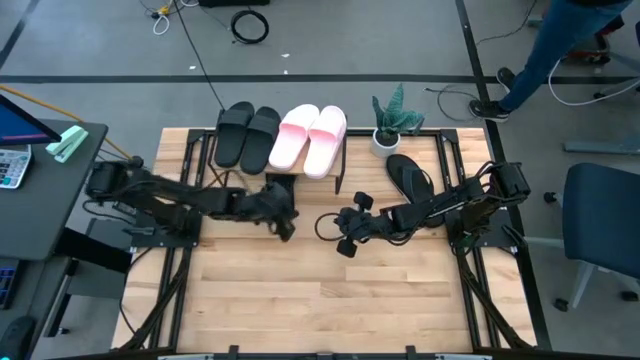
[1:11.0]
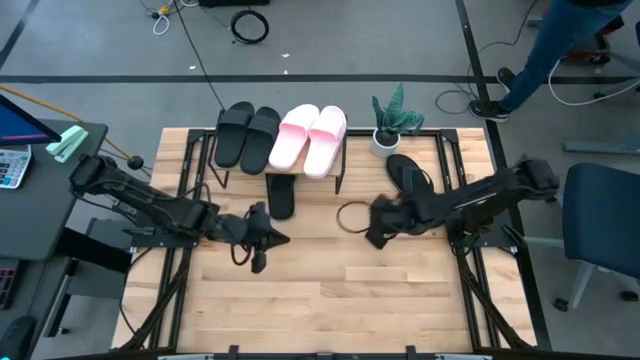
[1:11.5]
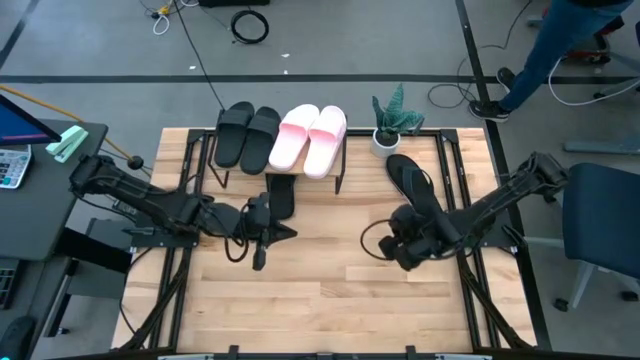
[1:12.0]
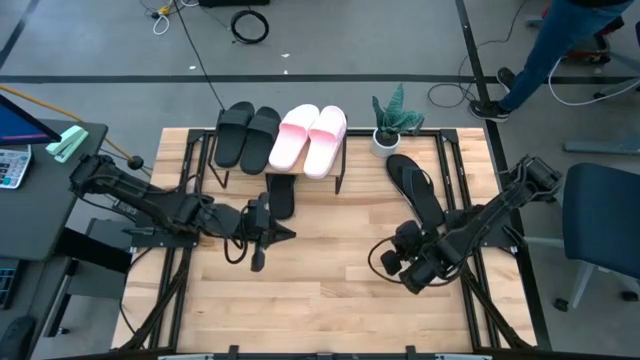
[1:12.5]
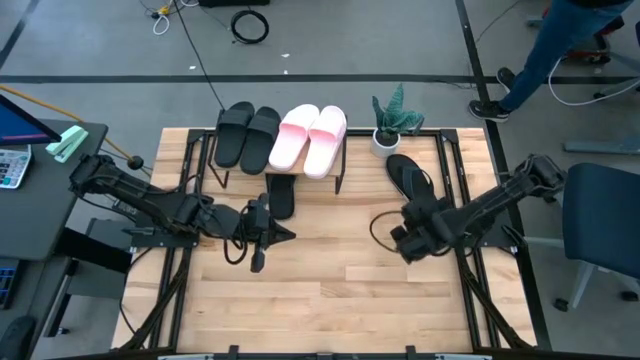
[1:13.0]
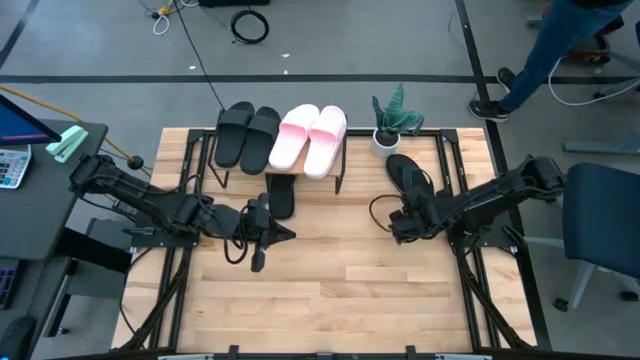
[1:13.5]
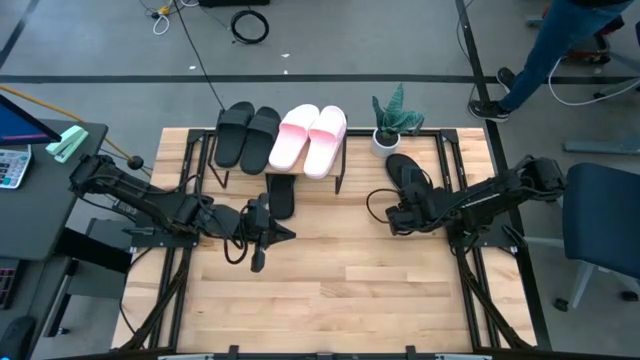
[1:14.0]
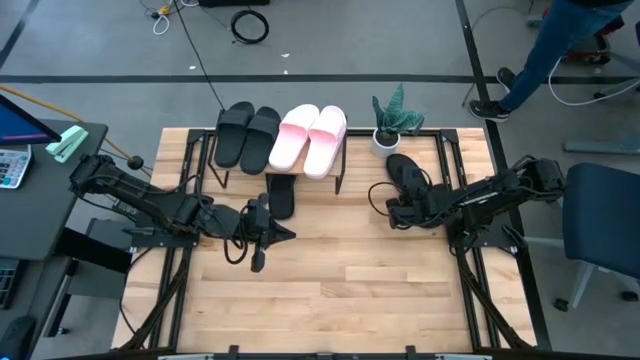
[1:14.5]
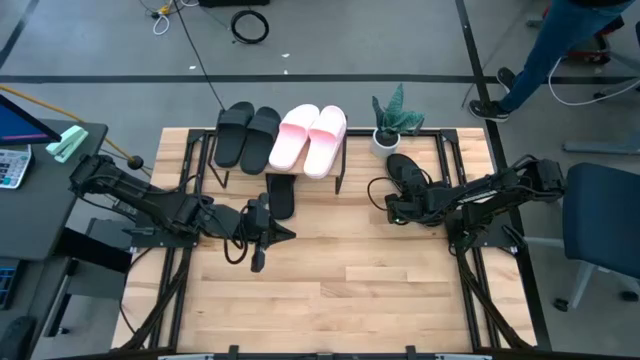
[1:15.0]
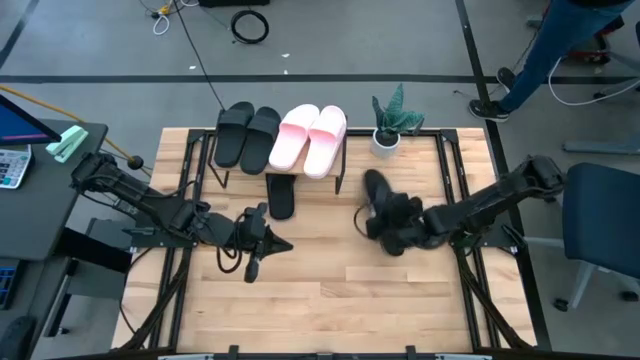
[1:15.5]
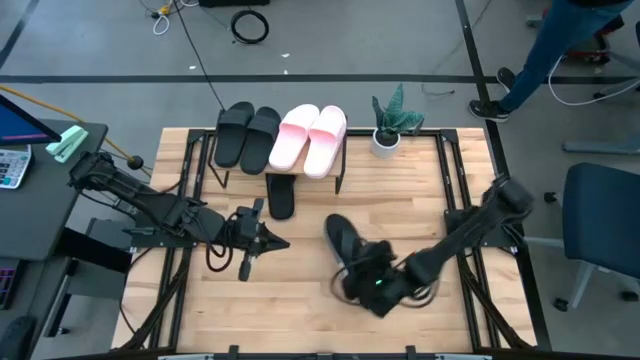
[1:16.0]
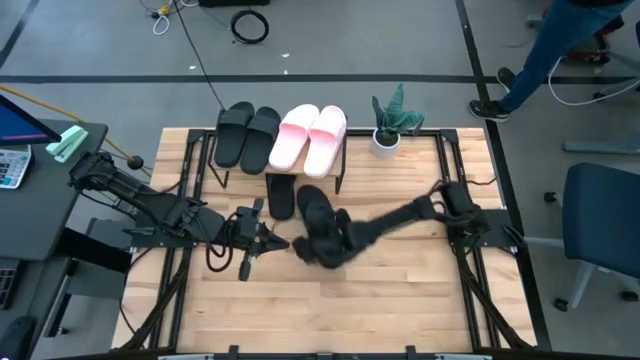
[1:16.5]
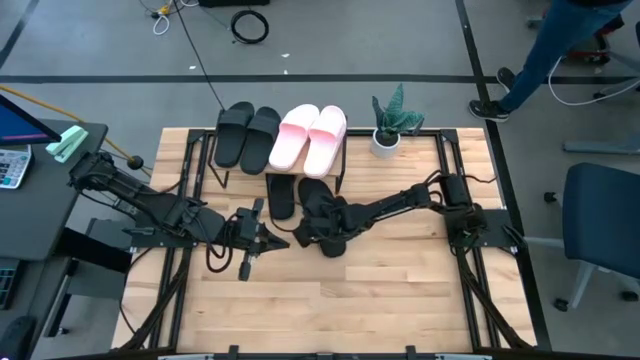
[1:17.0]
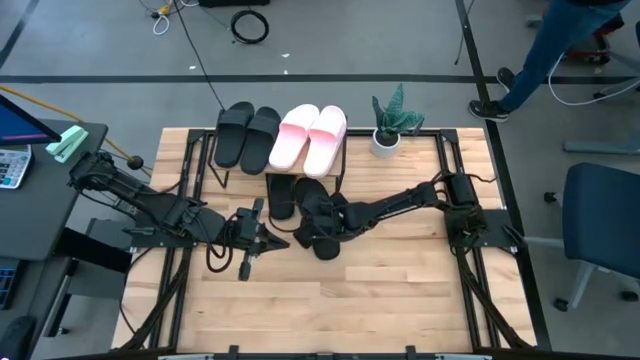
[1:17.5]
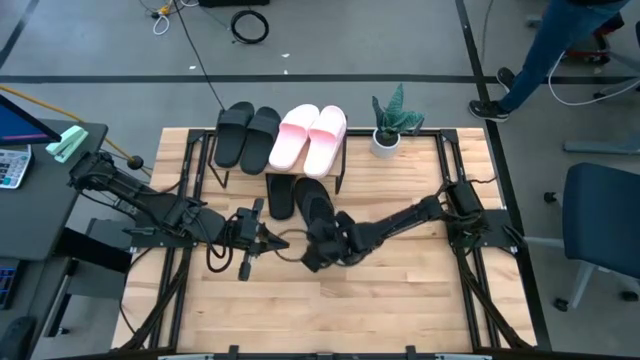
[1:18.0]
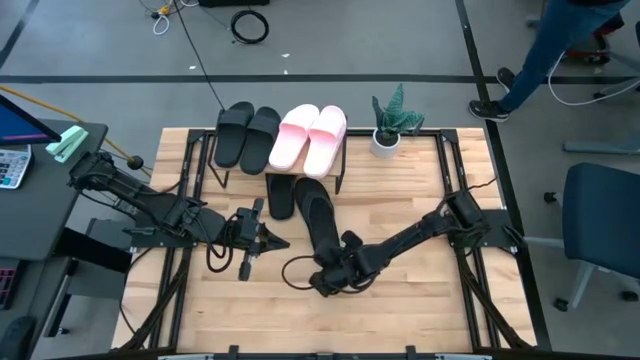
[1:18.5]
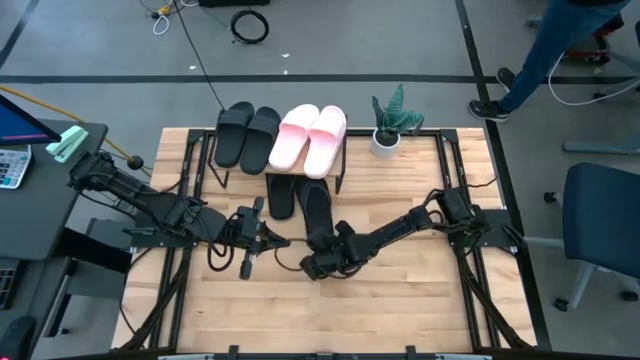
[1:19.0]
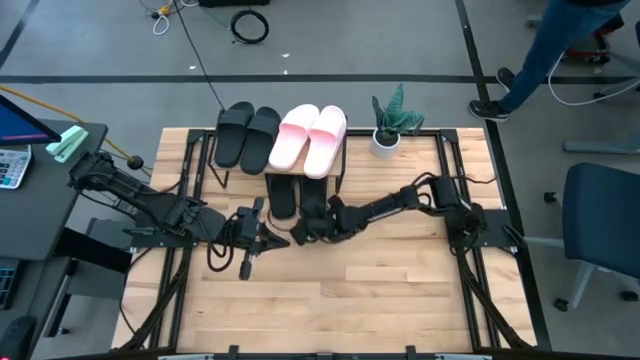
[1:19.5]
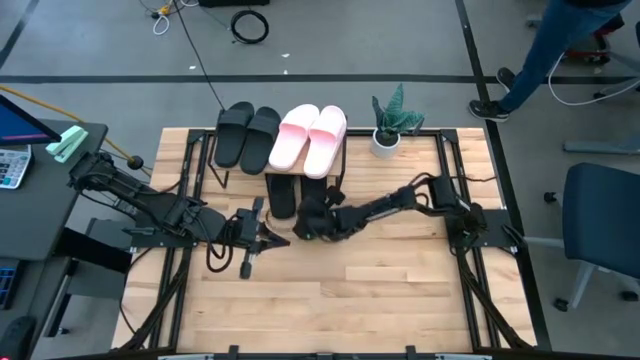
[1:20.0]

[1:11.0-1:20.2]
Task: Pick and place slides into the shelf
Put the black slipper under the shelf

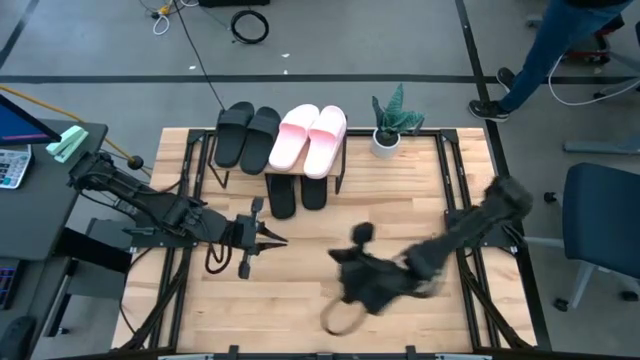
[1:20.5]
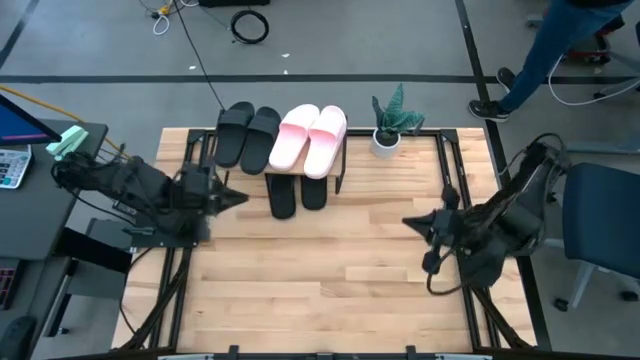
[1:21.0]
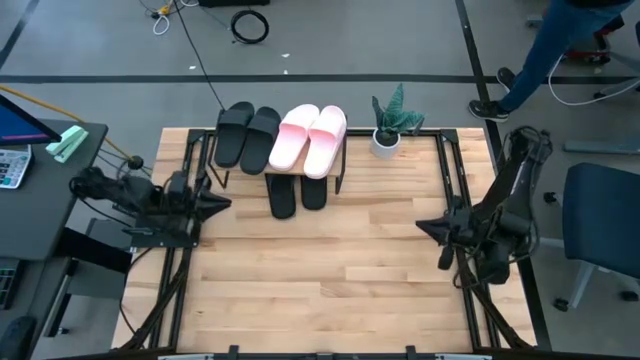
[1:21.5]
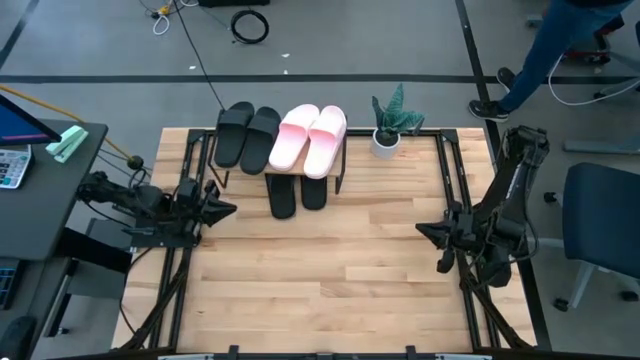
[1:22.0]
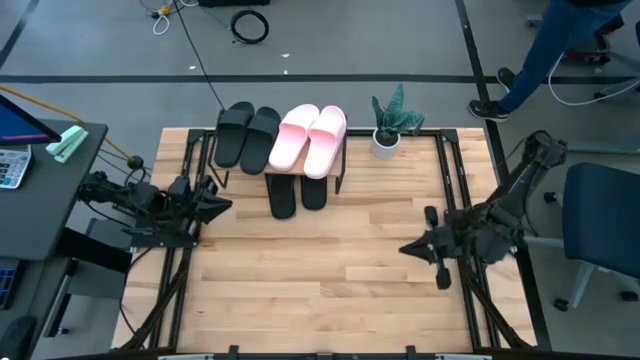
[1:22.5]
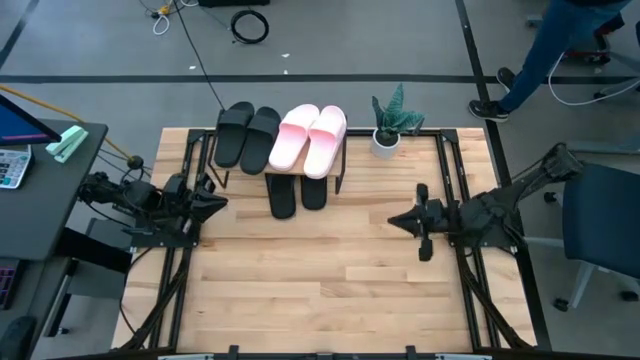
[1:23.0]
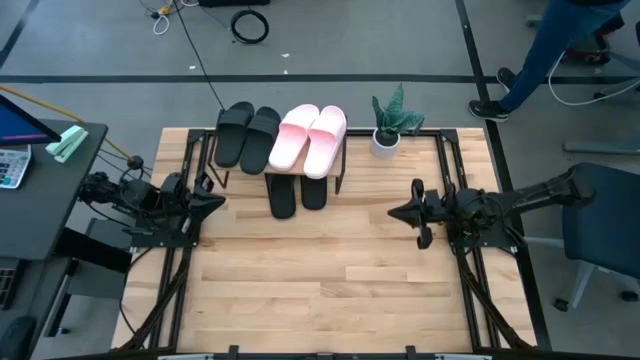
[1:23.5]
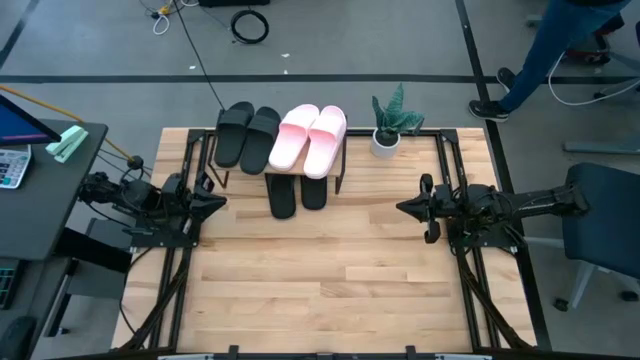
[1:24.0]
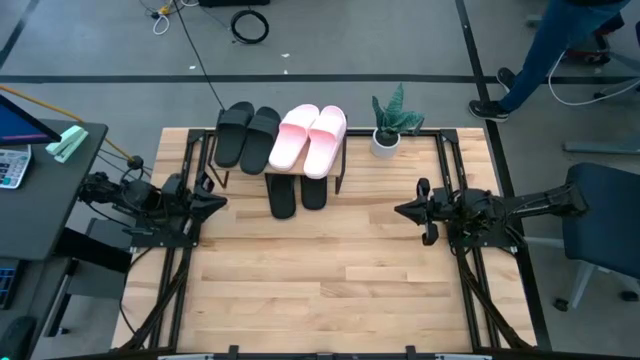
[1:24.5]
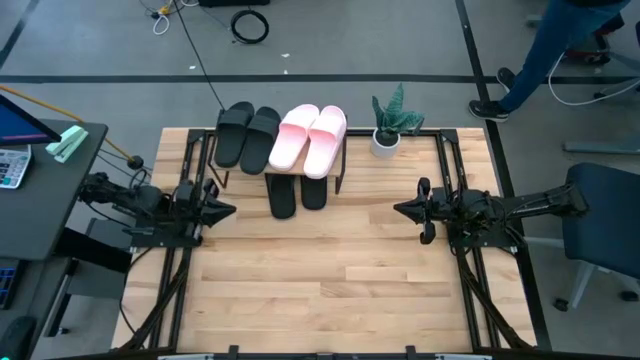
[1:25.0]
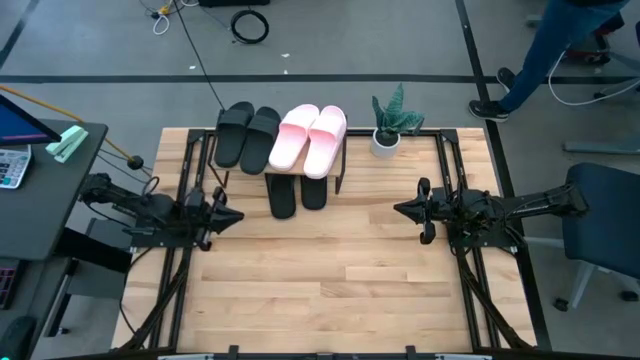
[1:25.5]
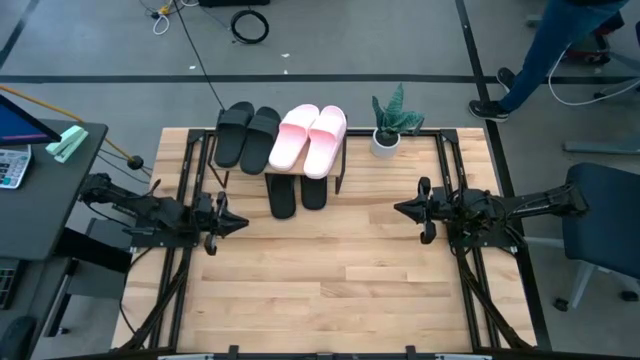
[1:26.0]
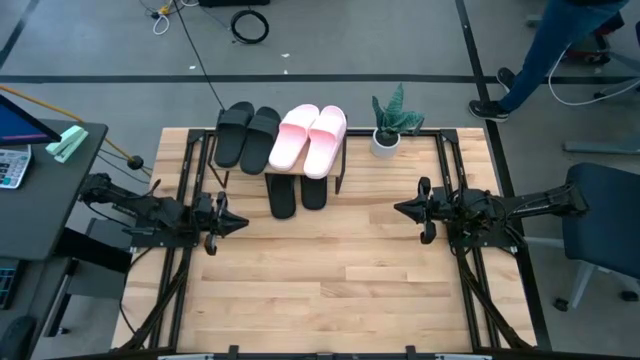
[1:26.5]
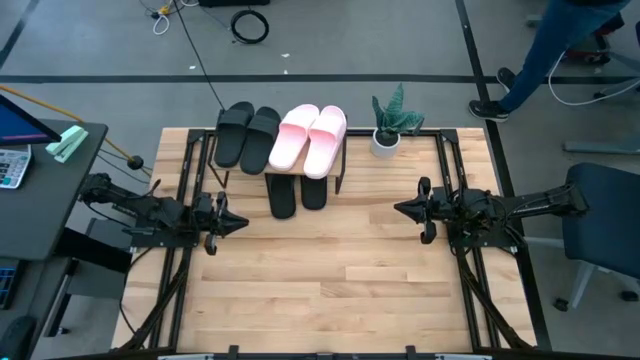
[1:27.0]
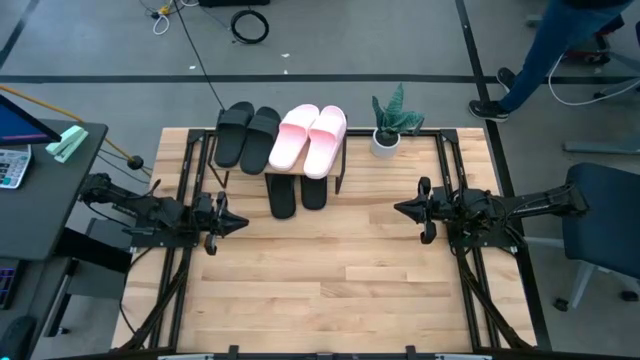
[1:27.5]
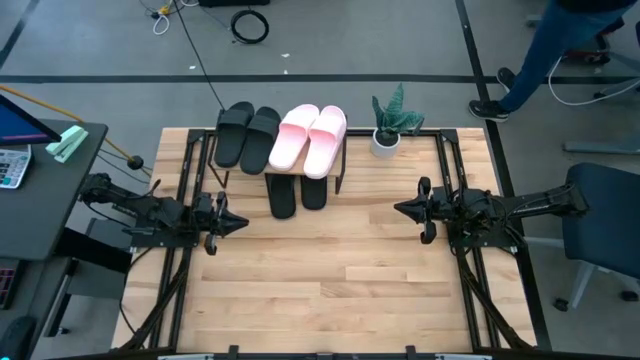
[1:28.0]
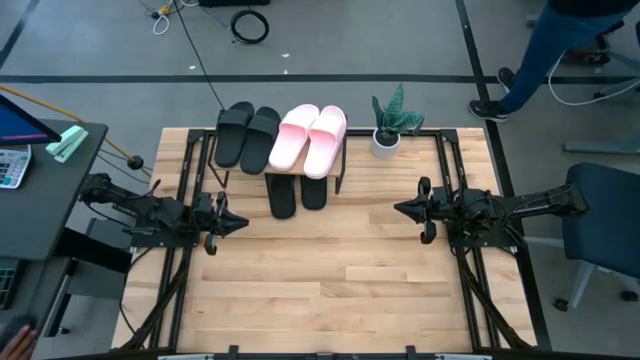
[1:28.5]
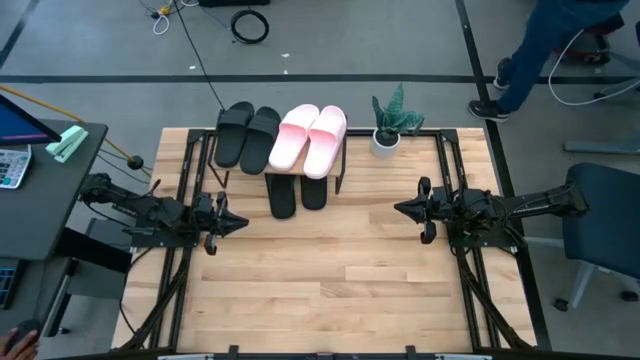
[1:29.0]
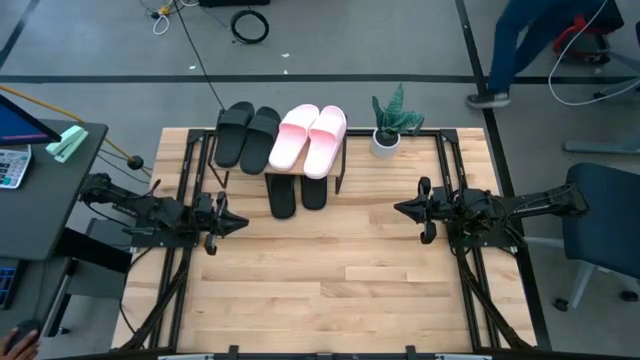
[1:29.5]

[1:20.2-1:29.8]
Return to Home Position

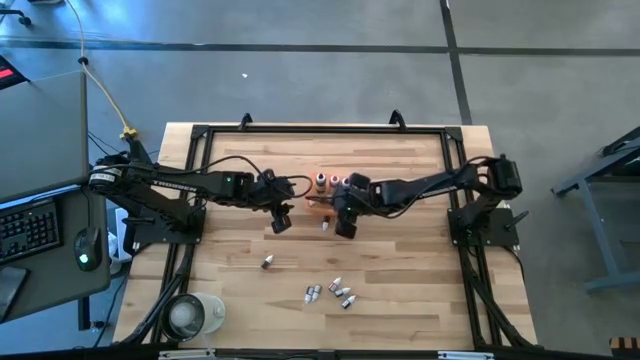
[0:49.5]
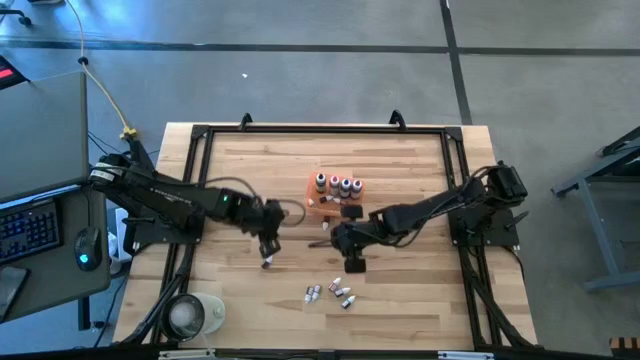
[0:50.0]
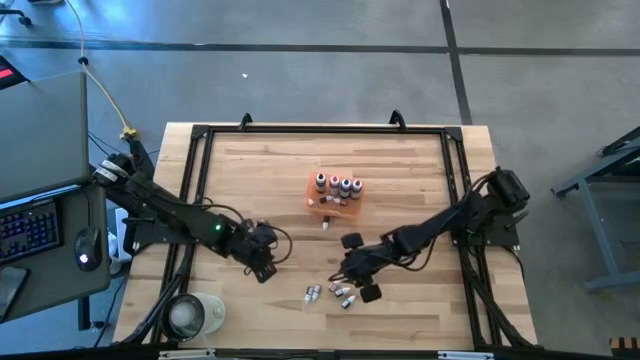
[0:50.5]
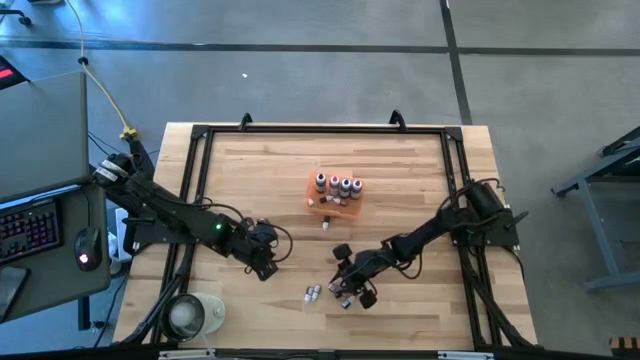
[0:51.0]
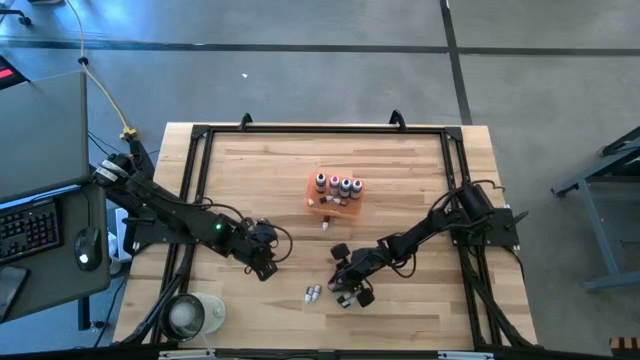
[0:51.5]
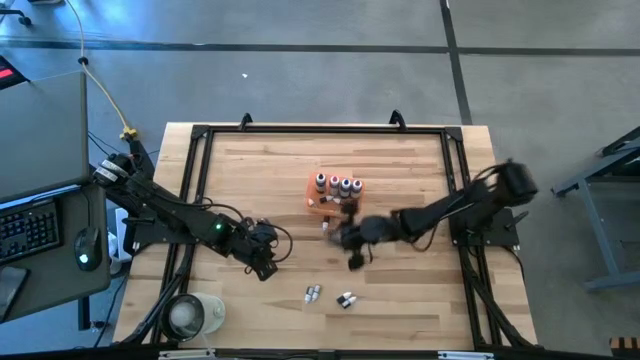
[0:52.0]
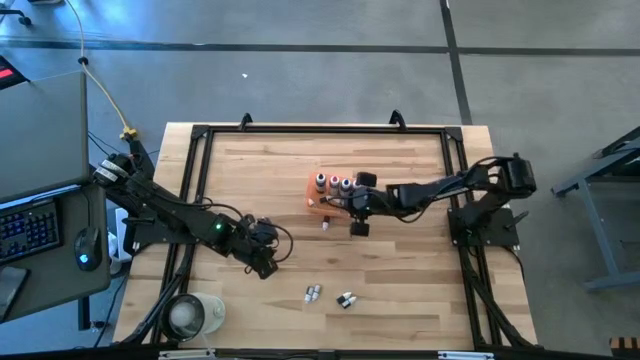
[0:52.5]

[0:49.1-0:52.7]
Task: Pick & Place food coloring
Put the bottom small red food coloring bottle into the orange bin
